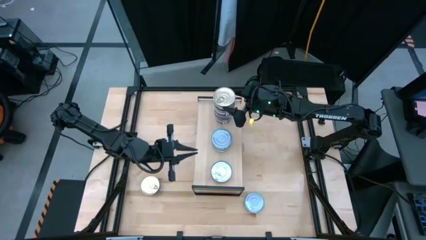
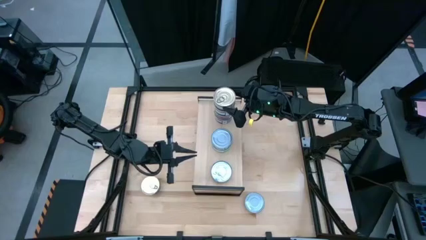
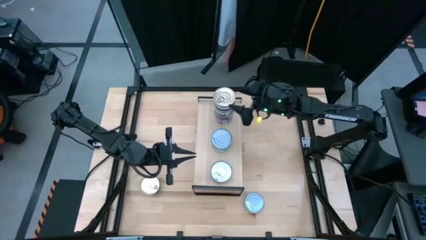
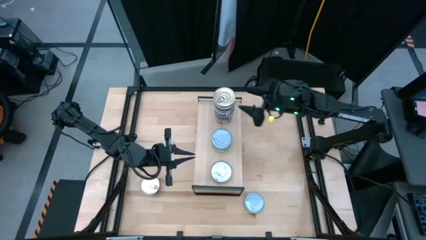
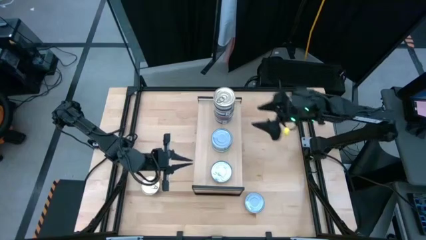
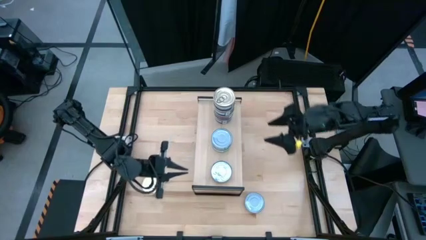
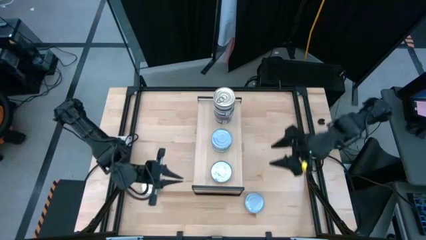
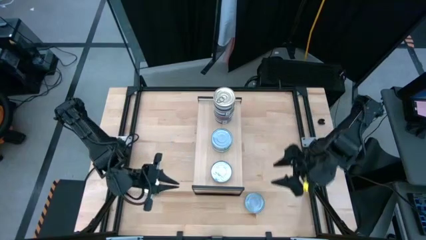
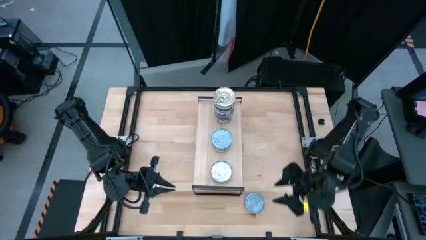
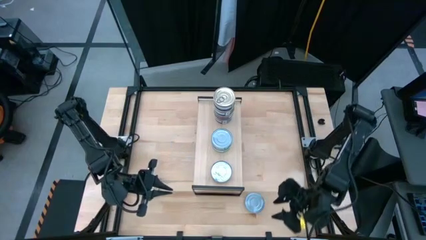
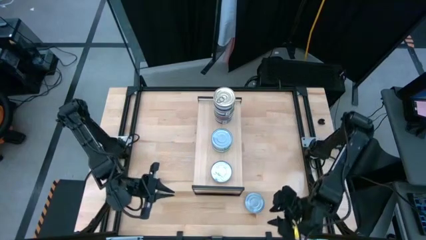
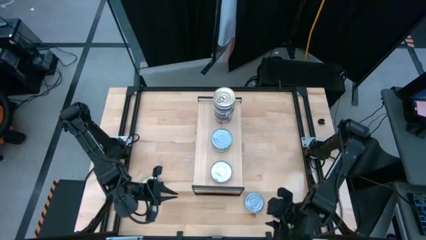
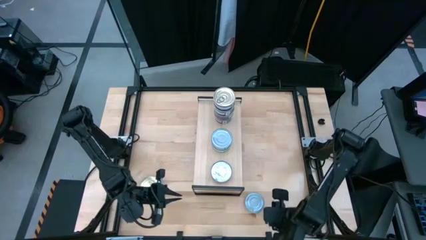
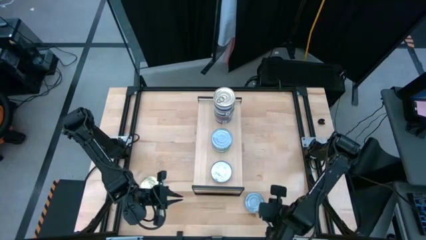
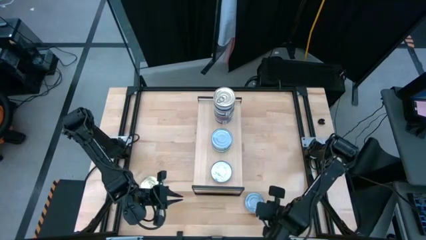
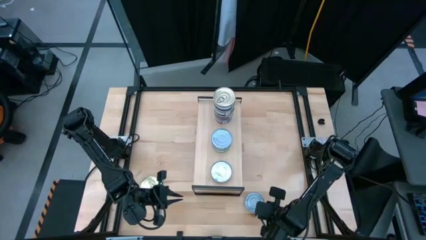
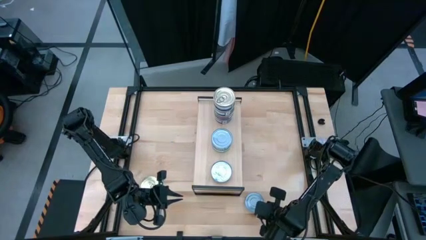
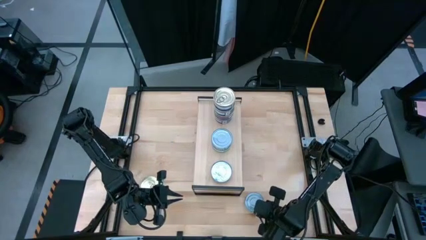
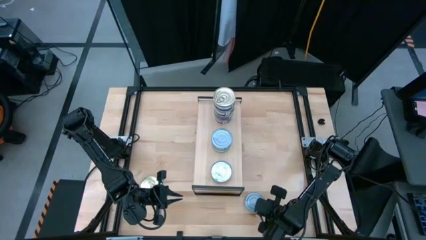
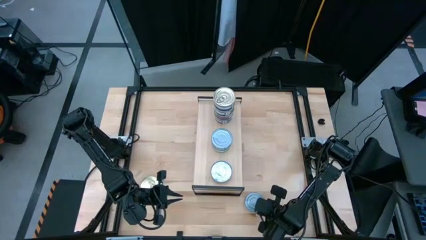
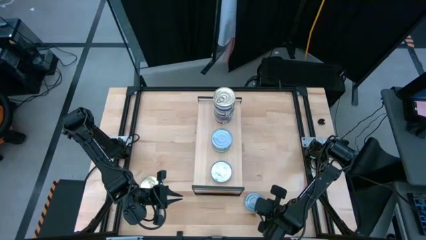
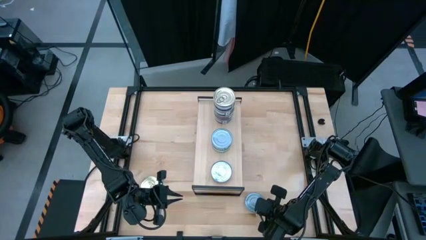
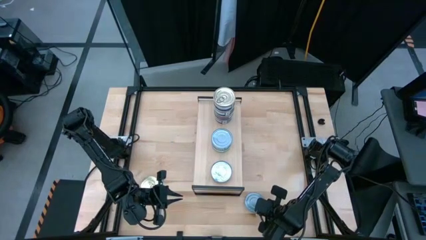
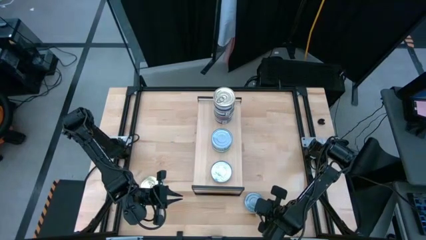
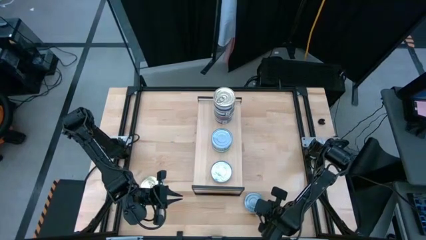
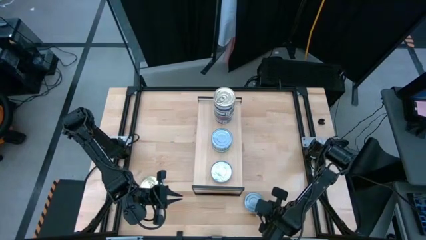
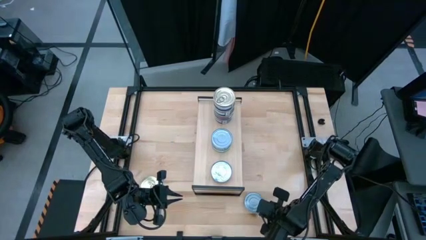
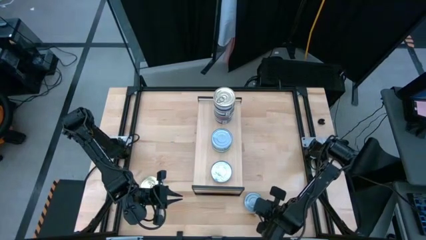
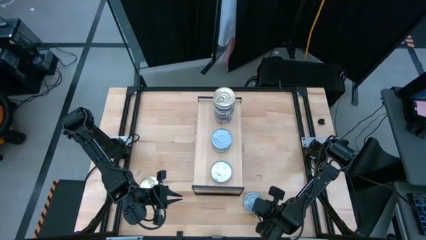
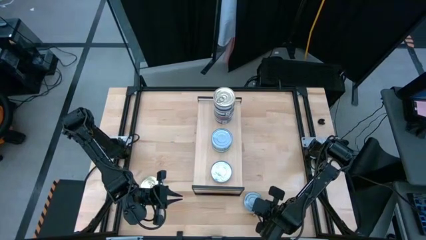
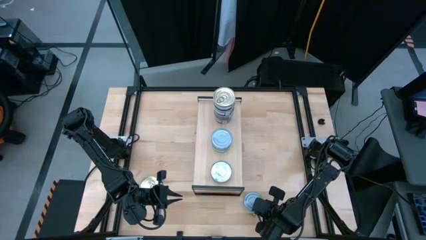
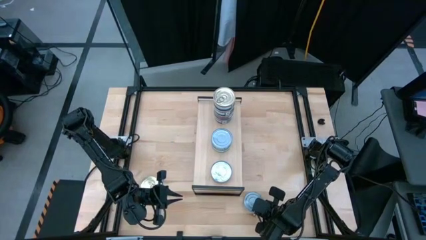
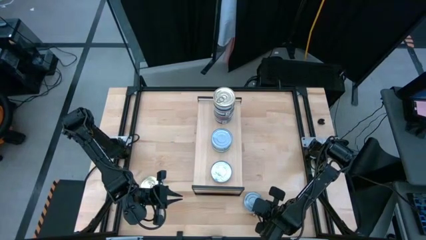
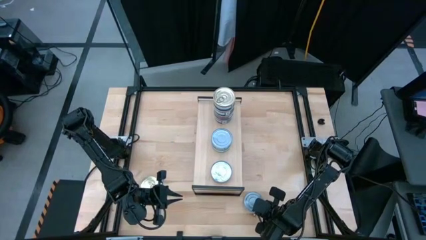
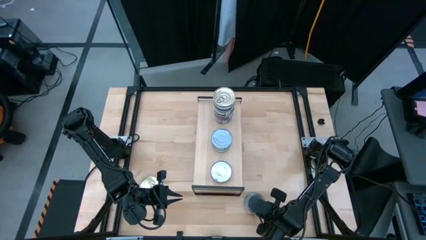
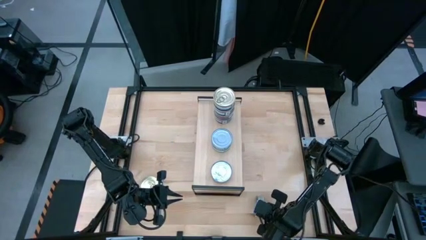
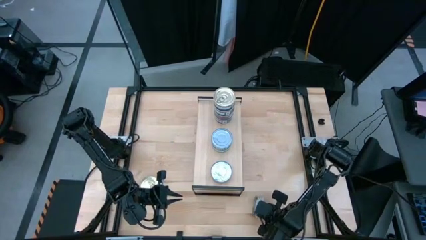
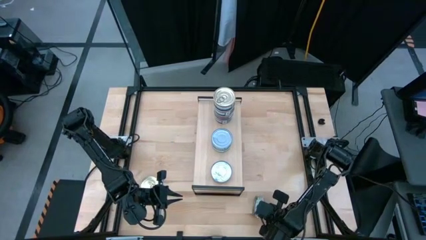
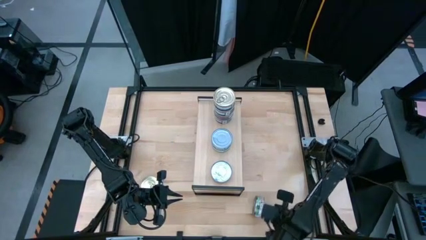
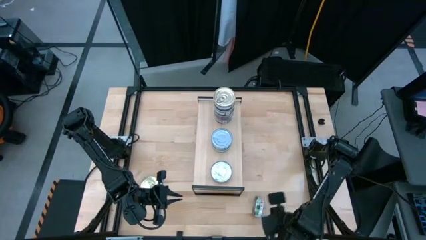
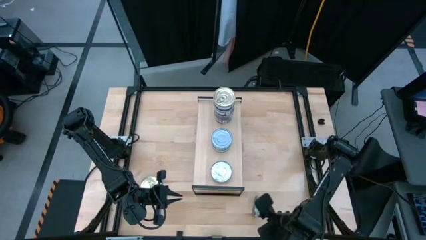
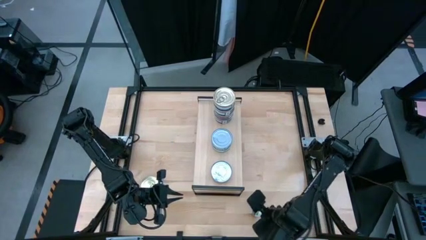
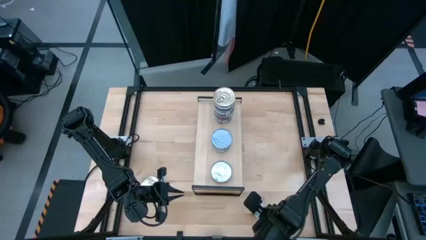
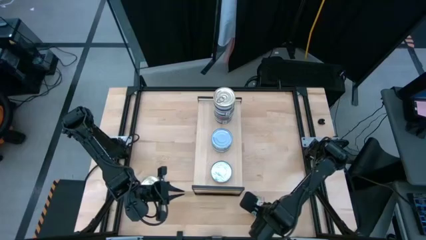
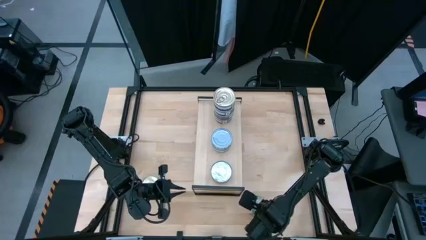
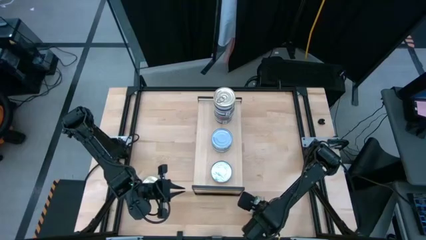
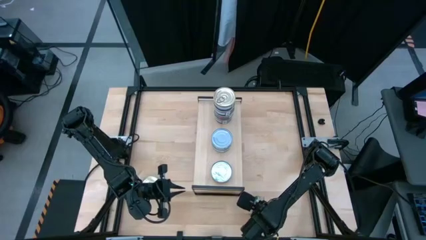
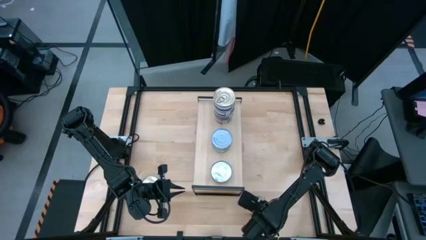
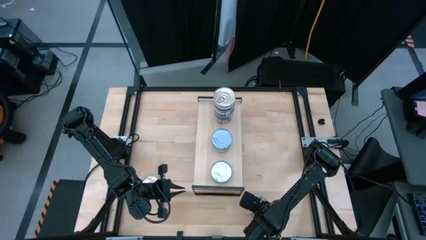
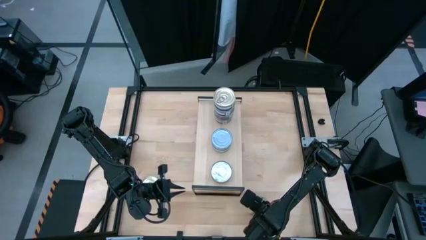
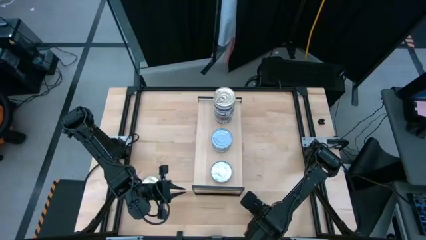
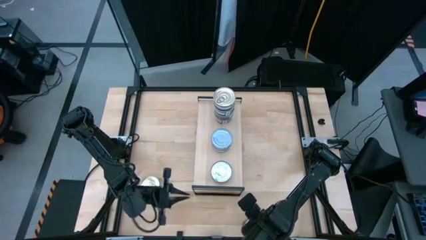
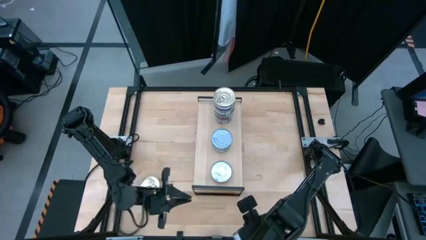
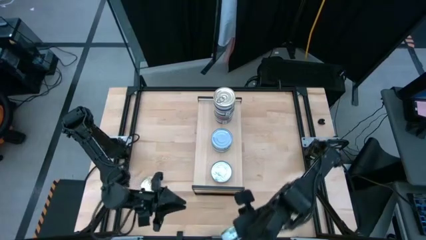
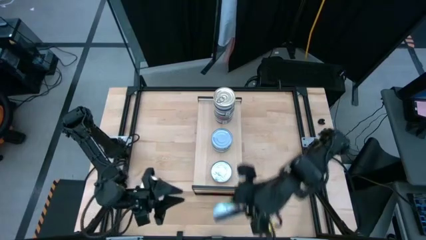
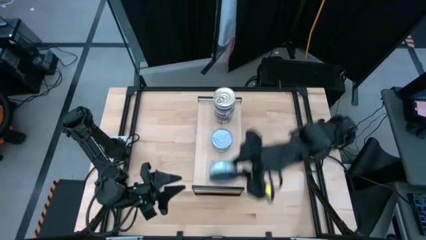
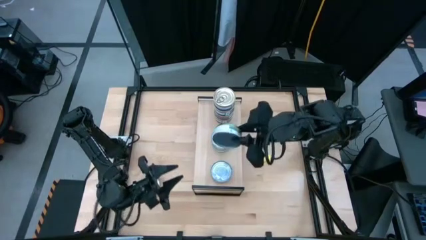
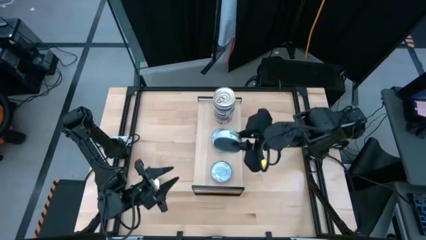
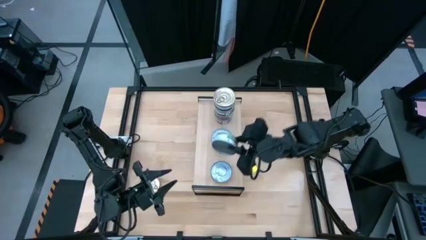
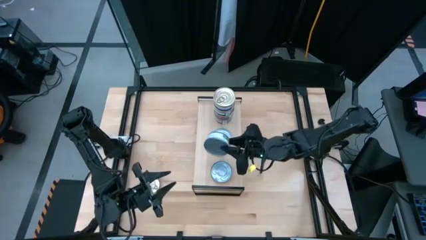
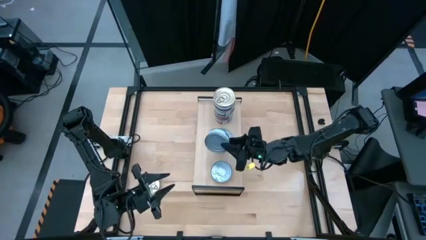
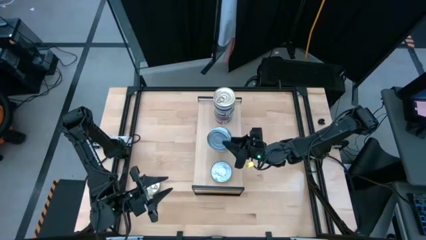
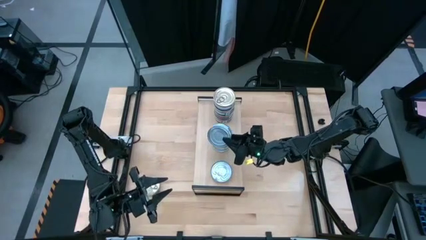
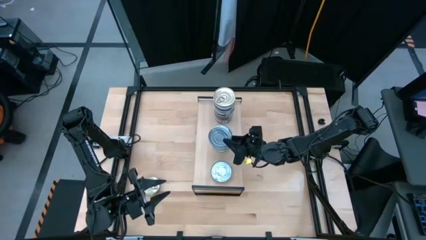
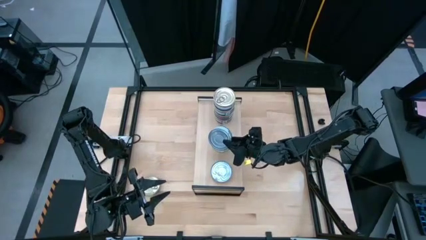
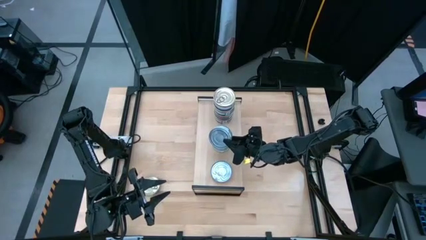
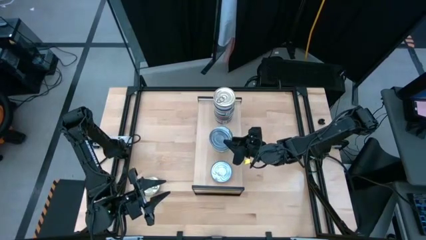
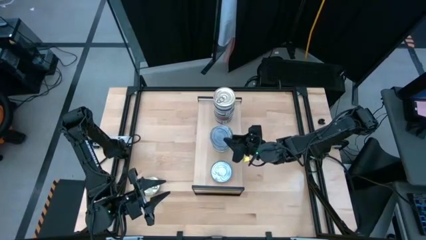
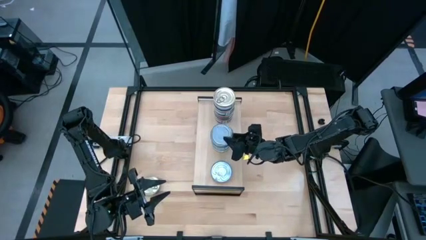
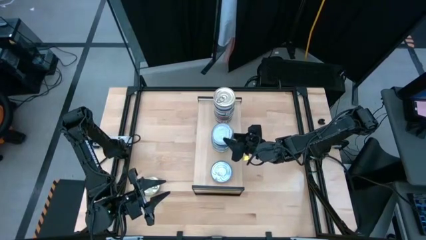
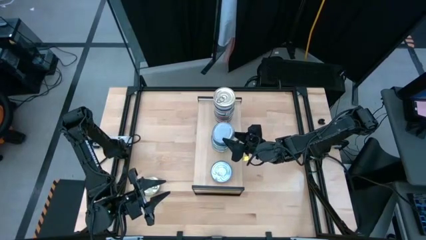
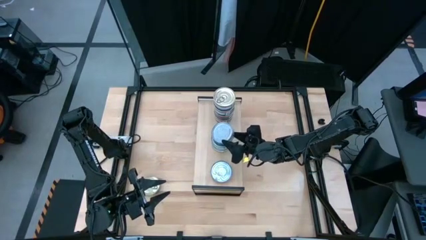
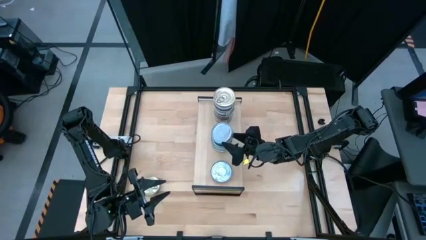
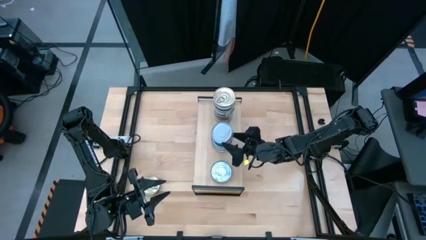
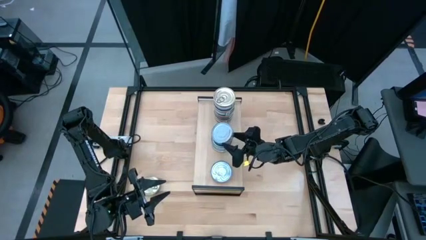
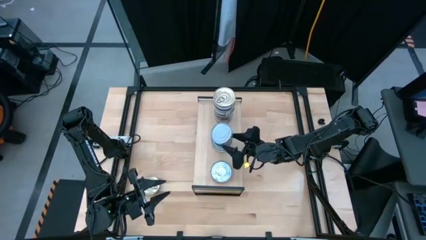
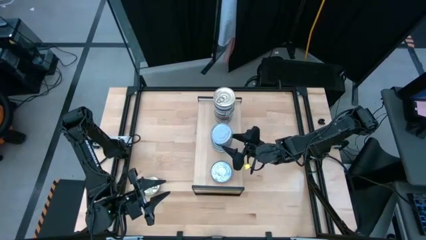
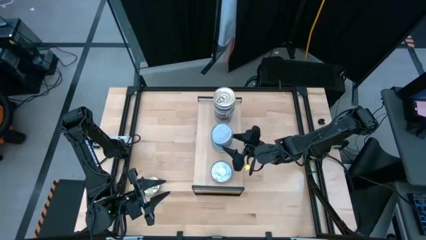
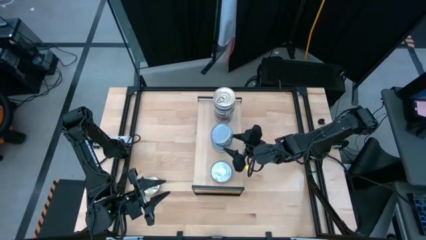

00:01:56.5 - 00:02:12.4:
Task: Stack canned seafood by type on shelf
Stack the green white tuna can on top of the stacked green white tuna can on the shelf

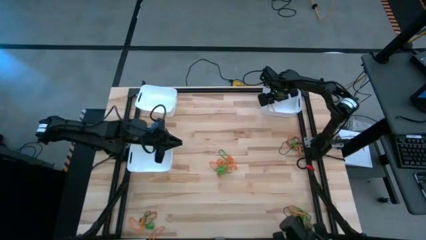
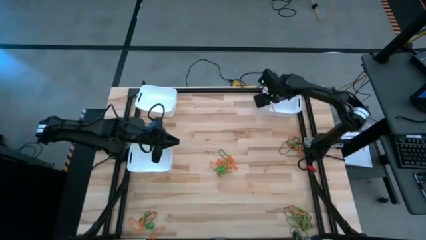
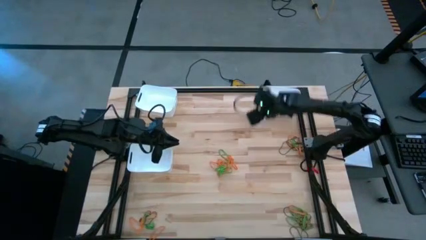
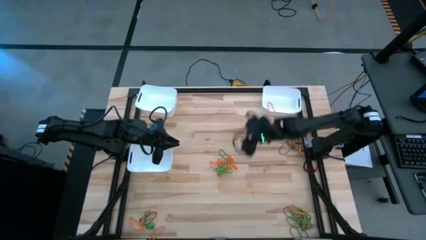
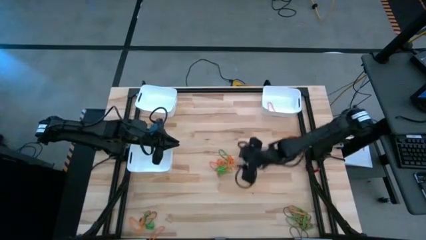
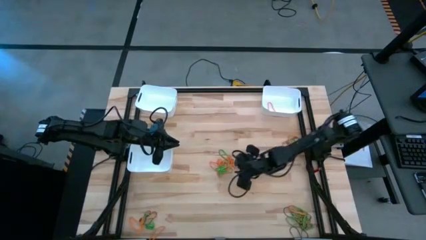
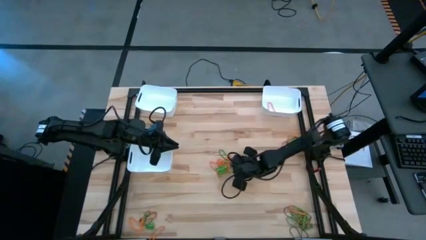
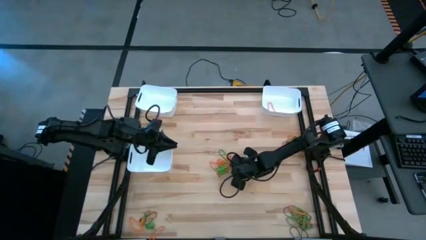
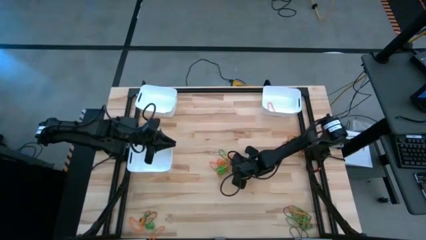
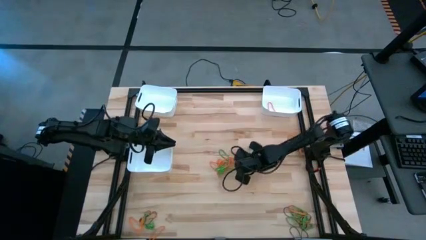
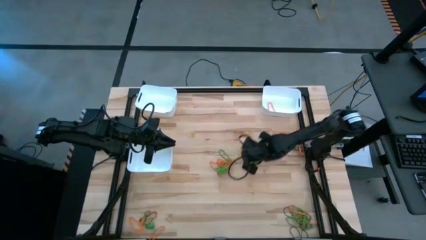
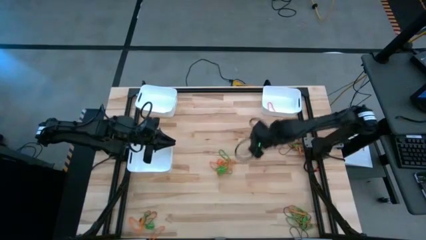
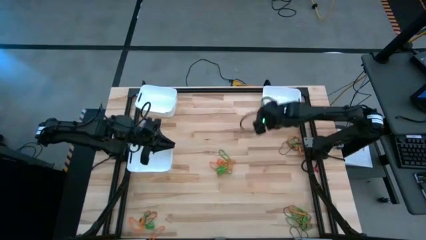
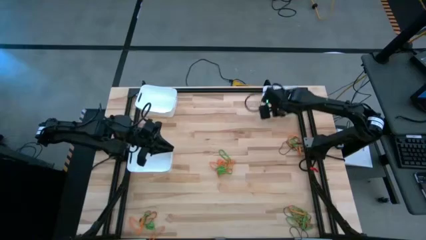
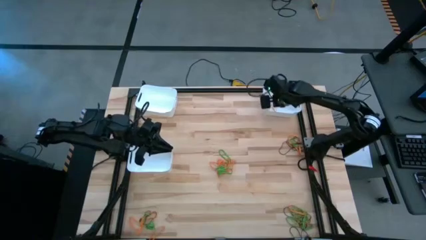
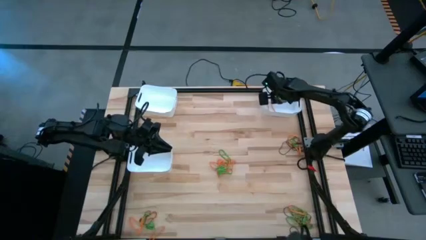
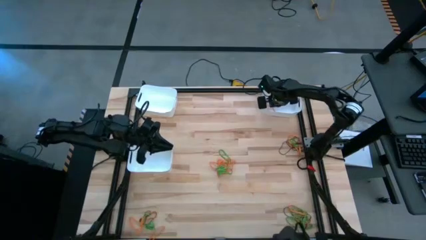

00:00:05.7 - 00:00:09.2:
Task: Sort rubber bands into baskets
Put the orange rubber band into the top right white bin
